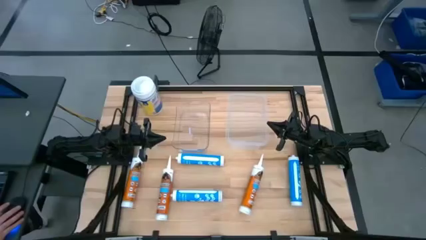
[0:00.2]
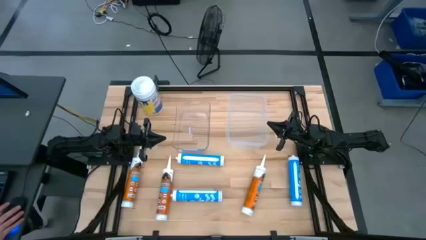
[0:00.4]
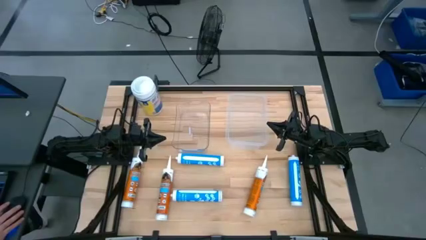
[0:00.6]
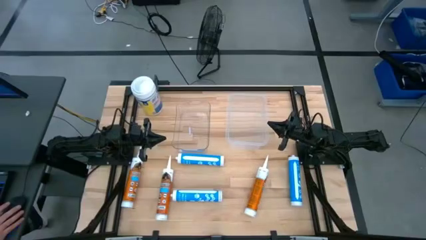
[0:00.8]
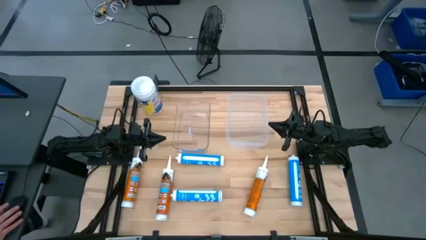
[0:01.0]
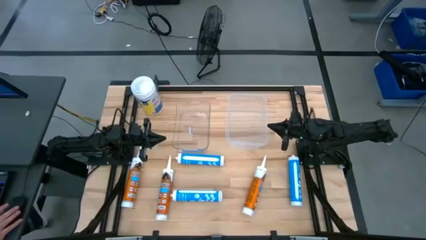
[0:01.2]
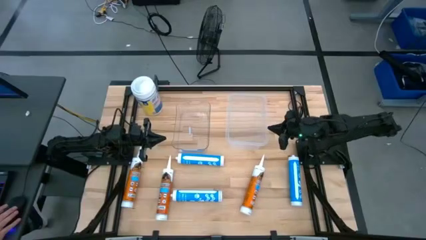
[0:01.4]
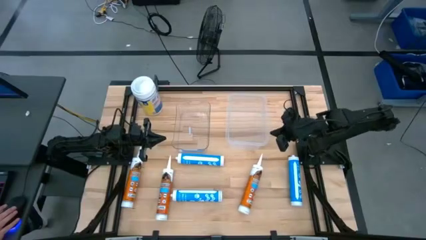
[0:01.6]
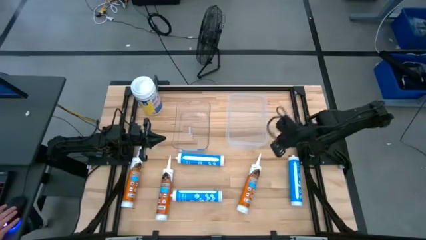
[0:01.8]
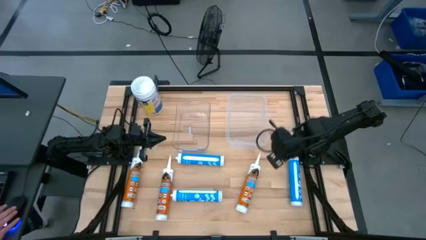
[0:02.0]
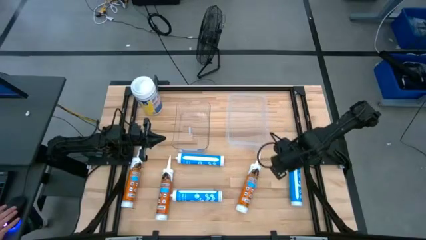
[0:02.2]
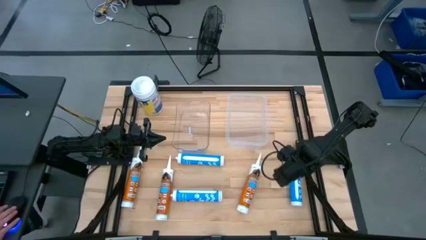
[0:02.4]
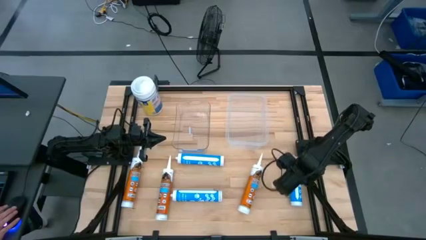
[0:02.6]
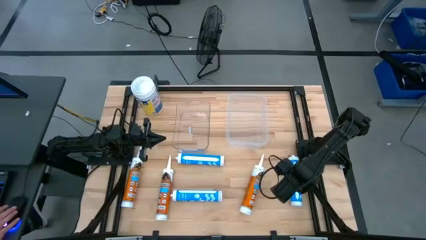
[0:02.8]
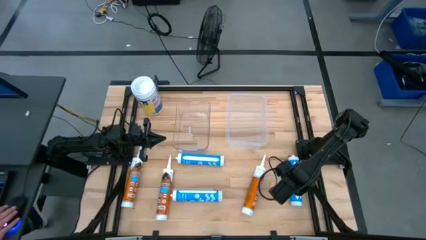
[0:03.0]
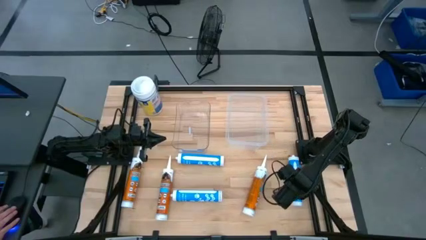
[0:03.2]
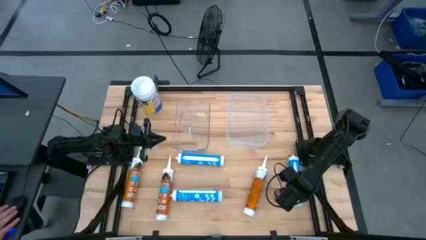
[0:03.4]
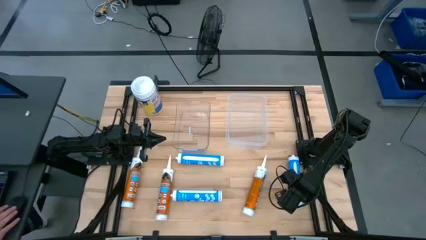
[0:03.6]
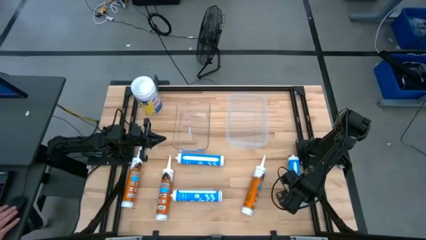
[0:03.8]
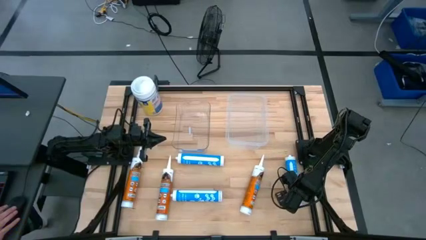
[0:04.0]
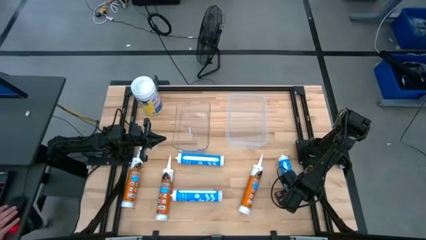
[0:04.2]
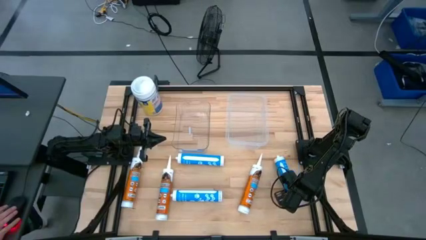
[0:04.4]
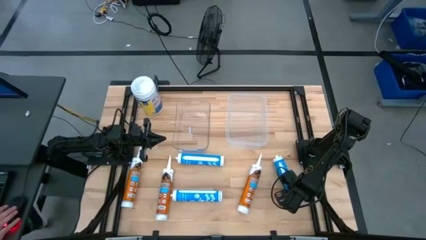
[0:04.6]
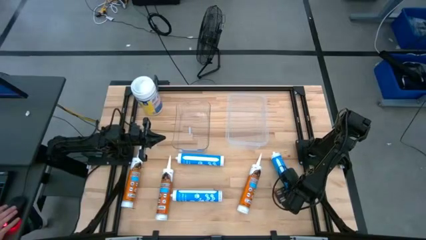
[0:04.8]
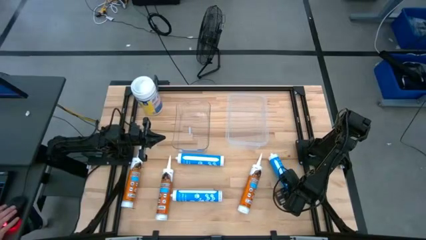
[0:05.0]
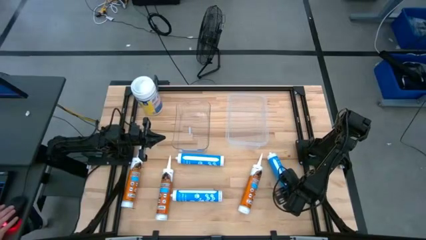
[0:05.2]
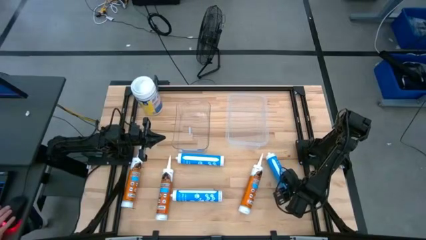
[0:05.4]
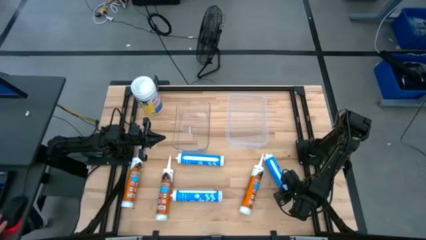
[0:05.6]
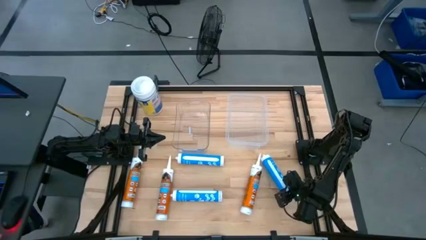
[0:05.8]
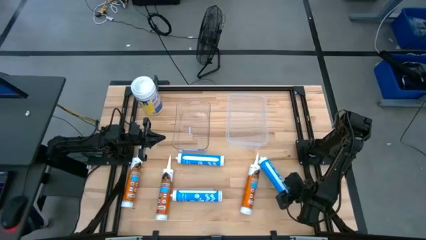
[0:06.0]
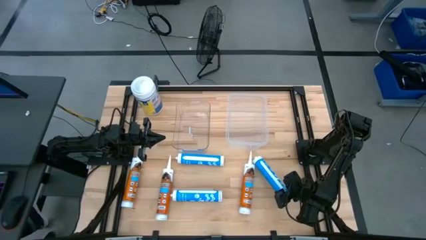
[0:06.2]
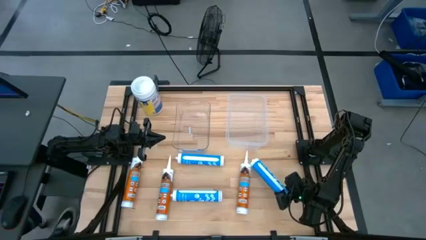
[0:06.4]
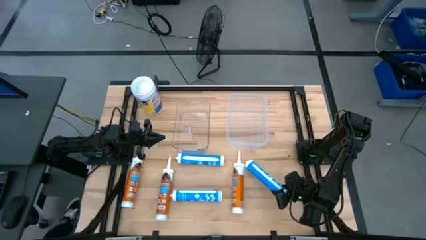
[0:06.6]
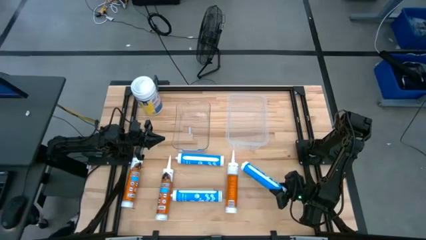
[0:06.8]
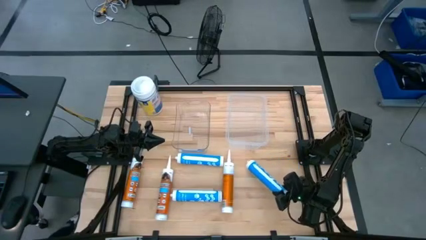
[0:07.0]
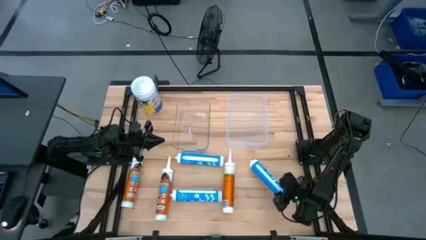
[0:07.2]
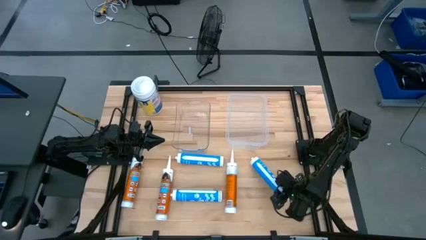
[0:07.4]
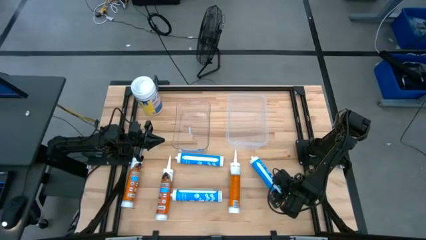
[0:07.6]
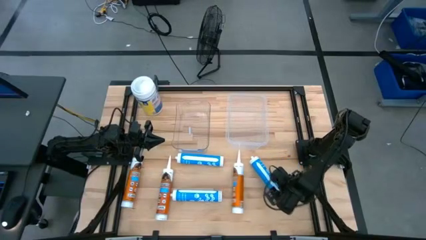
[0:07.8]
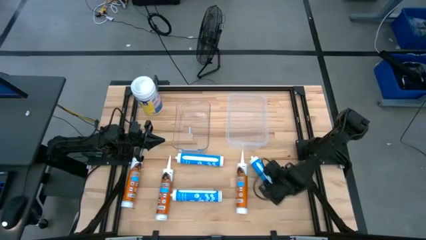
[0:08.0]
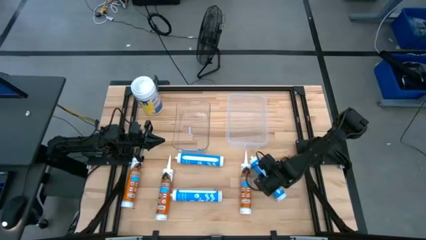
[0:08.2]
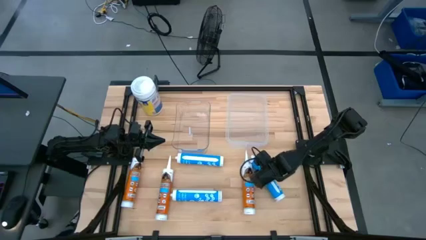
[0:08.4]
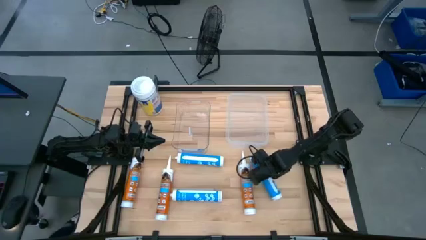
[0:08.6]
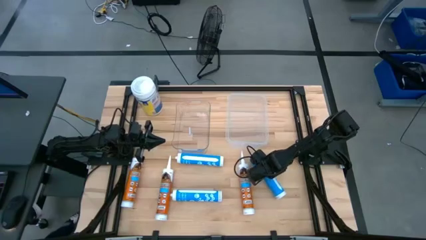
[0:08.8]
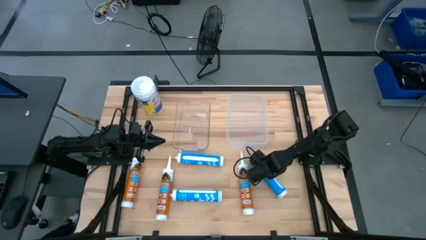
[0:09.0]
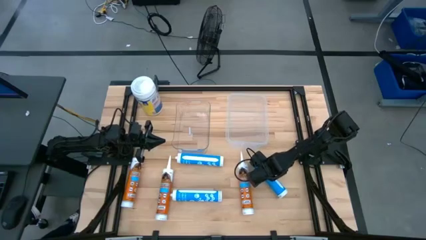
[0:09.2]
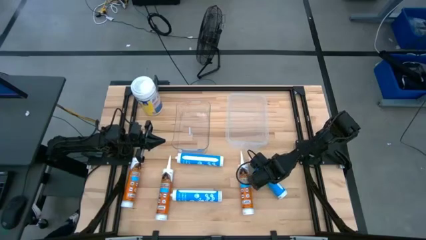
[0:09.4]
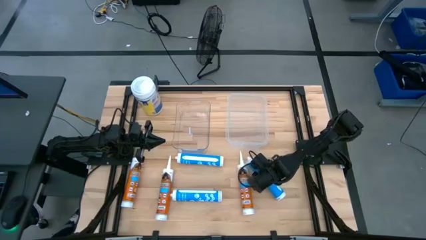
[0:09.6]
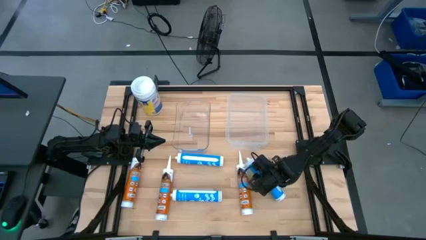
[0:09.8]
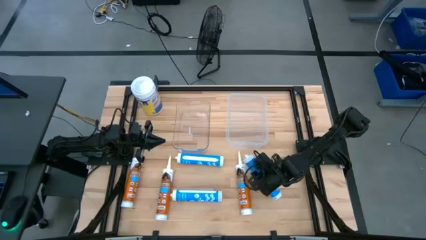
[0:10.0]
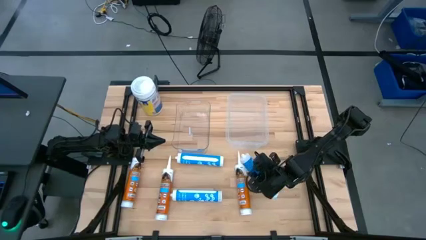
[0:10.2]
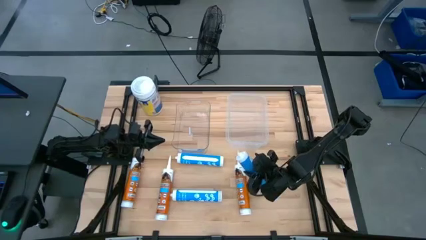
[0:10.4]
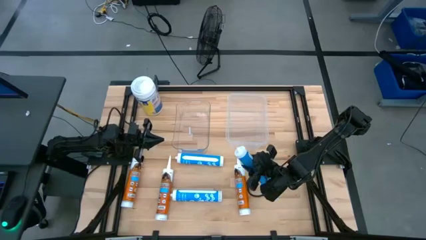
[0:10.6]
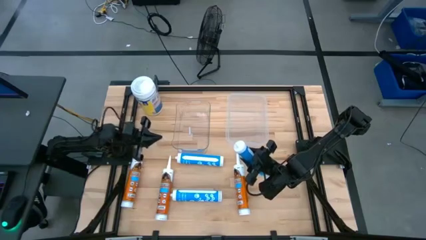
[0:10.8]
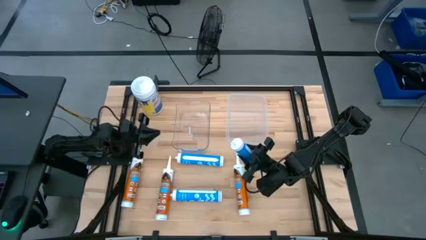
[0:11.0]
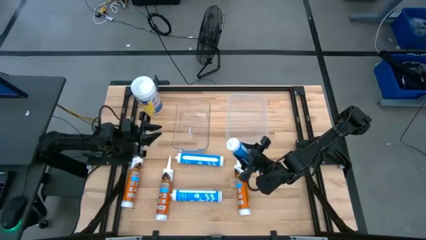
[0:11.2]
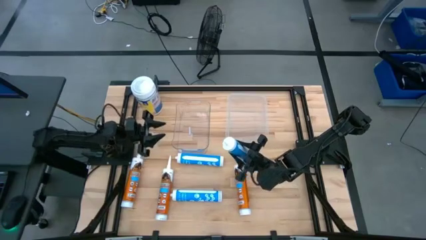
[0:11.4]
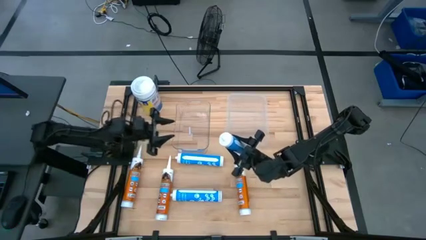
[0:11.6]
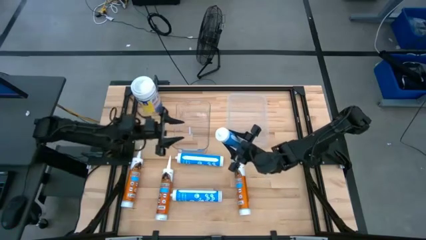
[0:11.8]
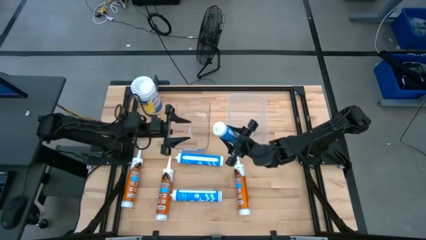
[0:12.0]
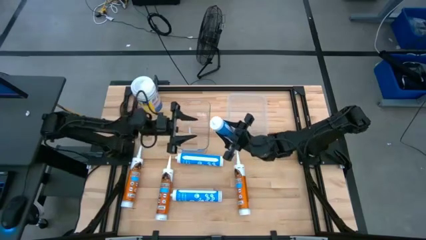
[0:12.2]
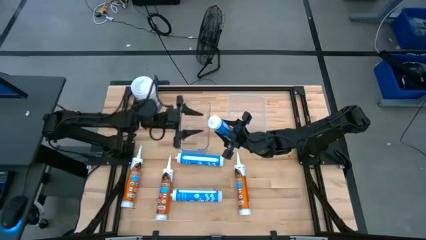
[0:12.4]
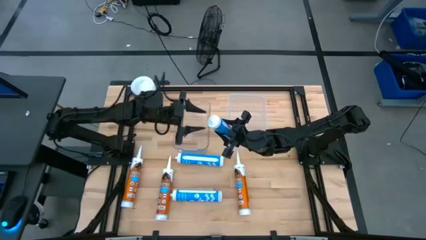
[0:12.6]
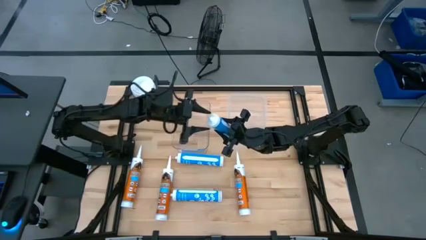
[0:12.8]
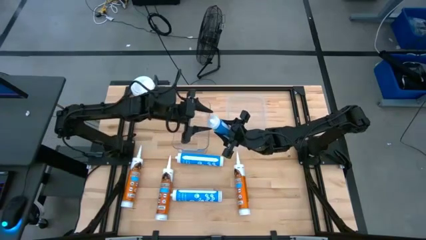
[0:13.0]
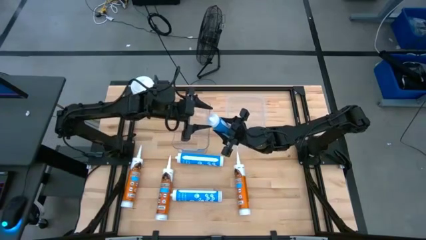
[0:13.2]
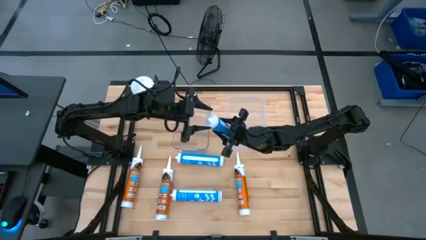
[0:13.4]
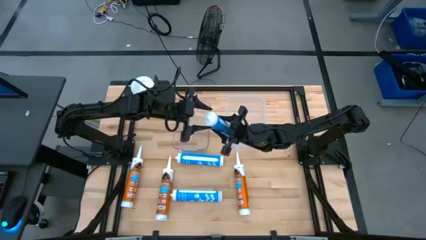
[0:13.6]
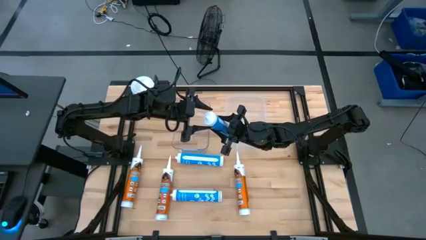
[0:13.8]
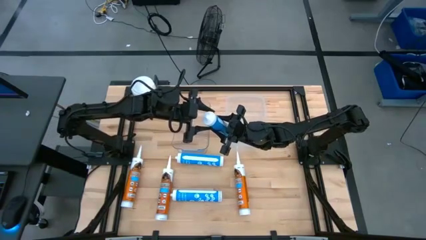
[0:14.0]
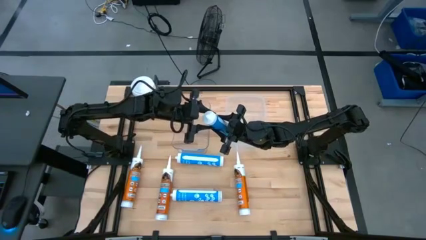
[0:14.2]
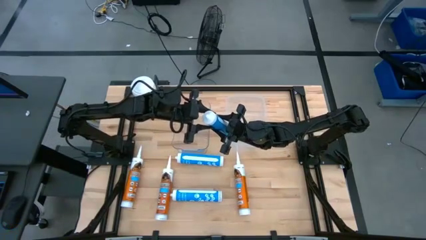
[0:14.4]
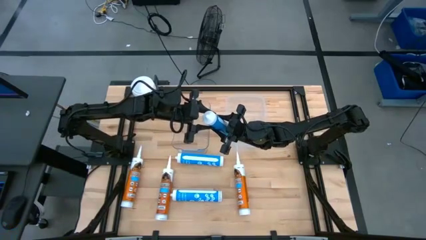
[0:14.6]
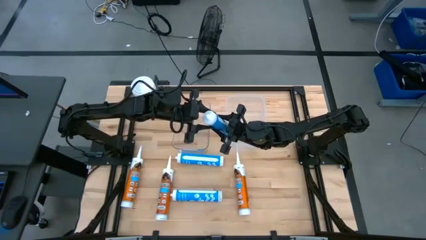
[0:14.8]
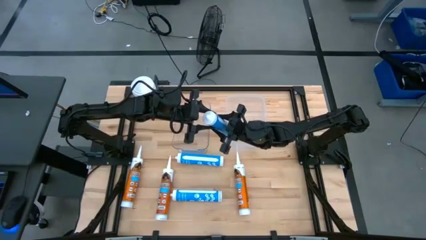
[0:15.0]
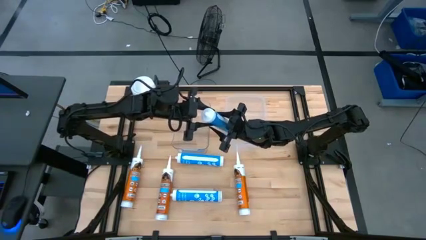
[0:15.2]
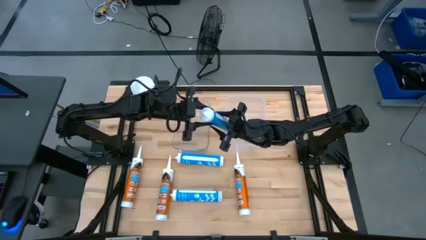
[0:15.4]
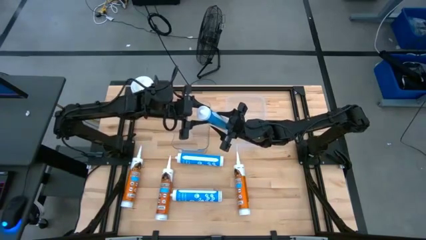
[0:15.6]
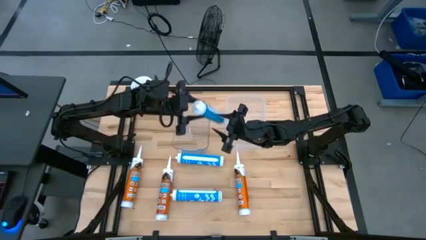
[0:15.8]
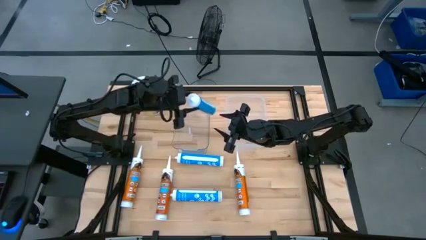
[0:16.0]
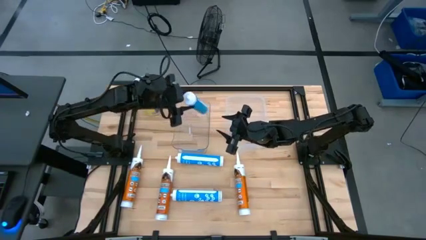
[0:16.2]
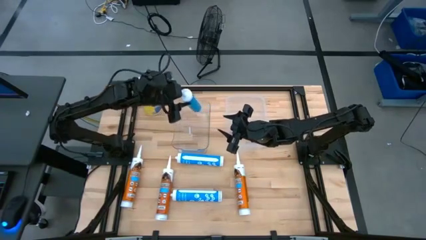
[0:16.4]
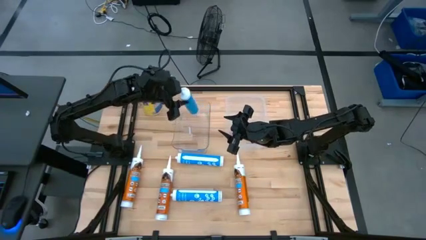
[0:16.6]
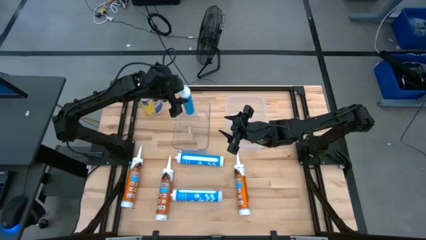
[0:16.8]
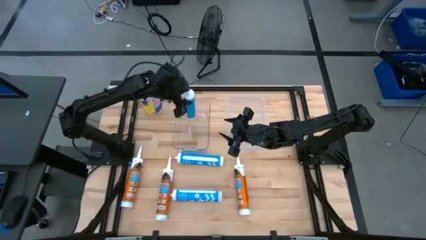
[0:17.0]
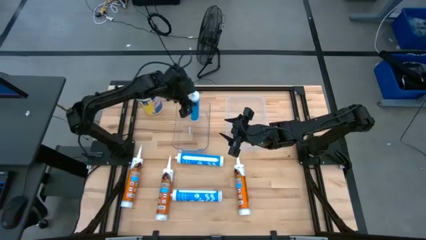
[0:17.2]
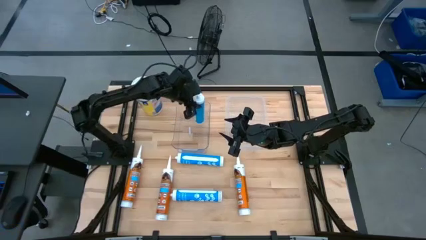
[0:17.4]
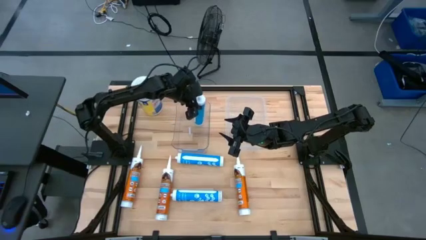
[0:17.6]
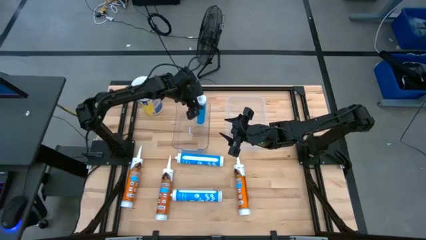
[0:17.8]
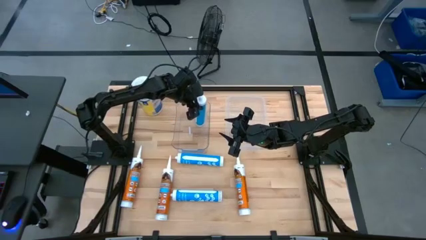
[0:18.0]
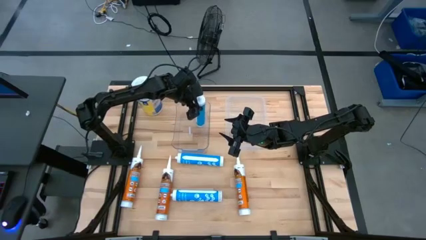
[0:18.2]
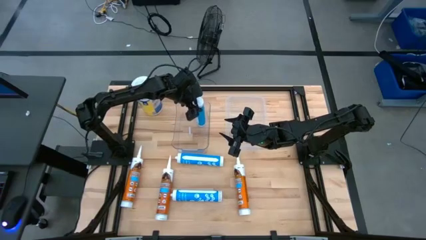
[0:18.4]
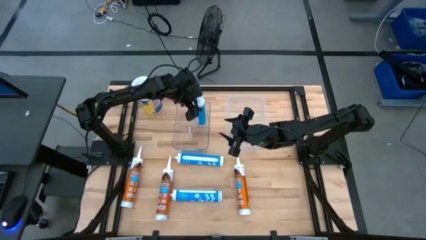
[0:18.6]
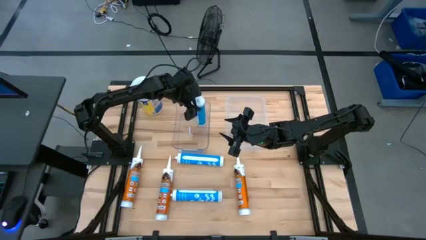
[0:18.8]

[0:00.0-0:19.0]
Task: Pick & place silicon tubes, Sealant and Lysol wipes
Put the right blue sealant into the left transparent bin
